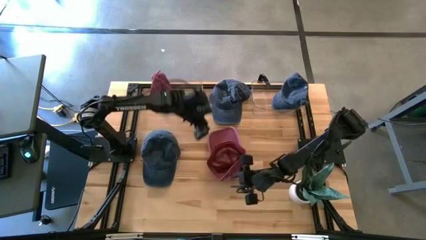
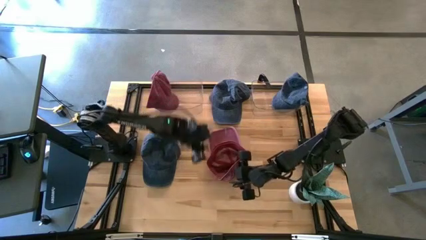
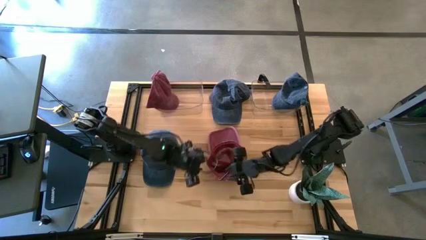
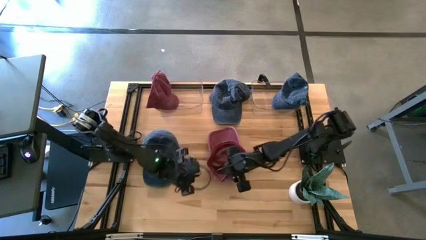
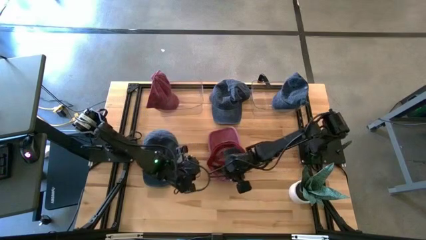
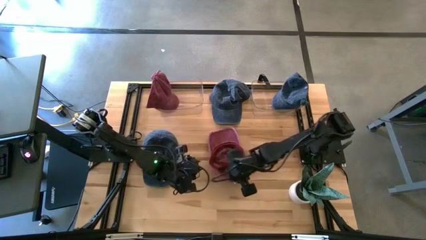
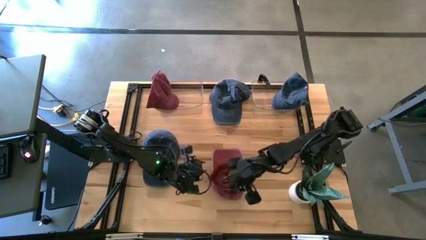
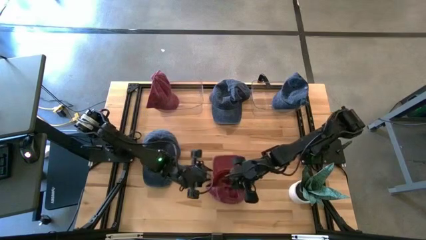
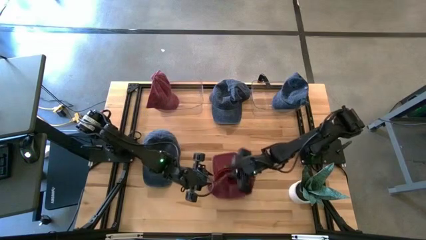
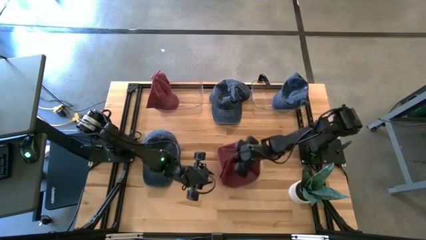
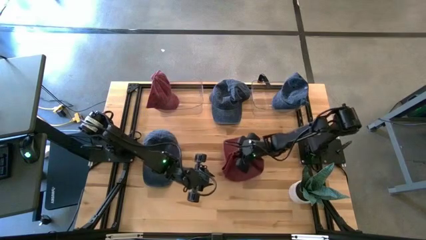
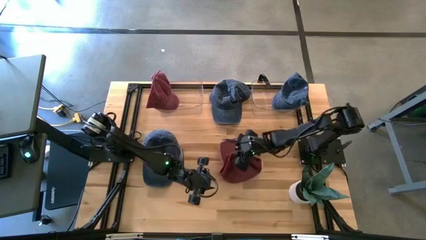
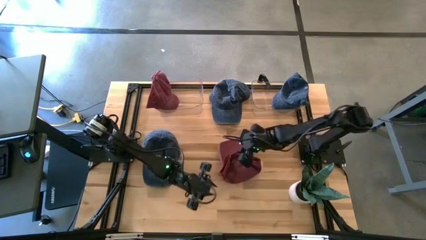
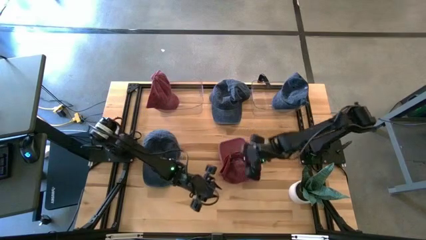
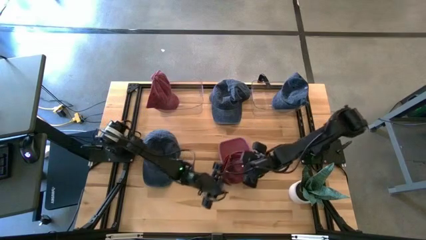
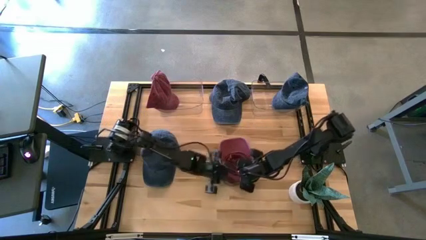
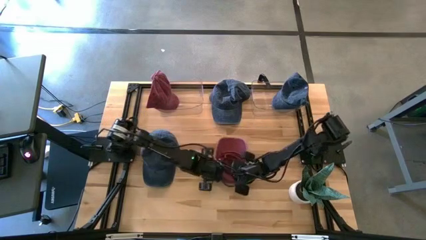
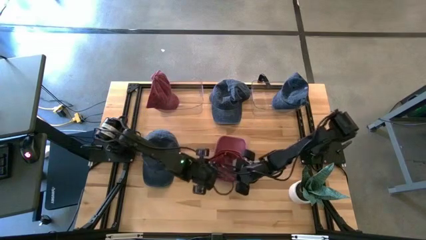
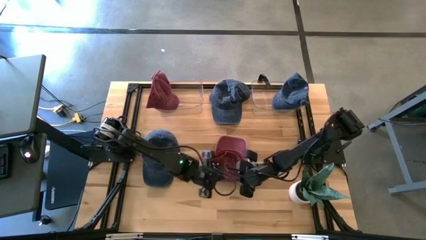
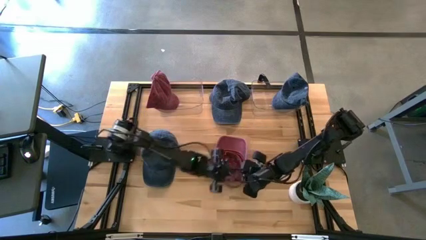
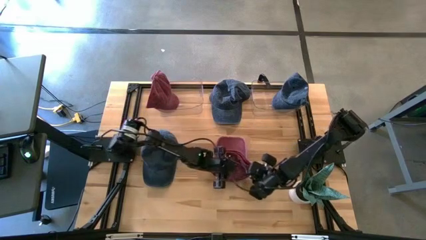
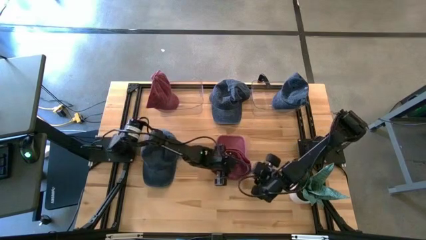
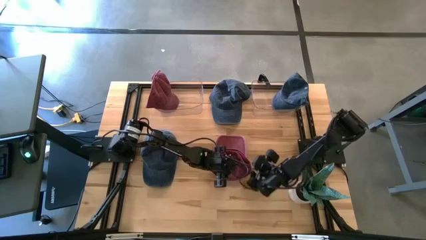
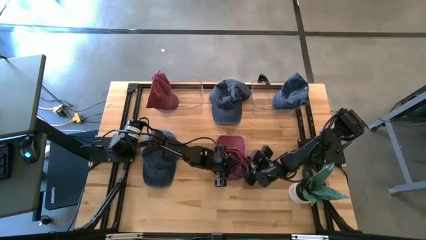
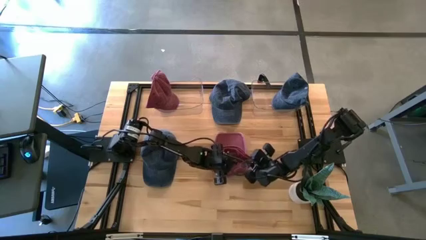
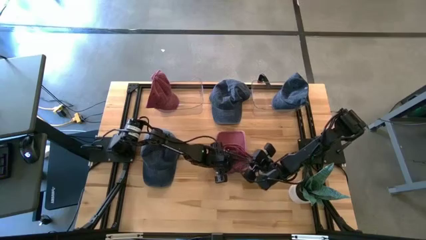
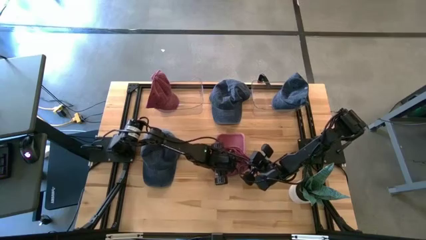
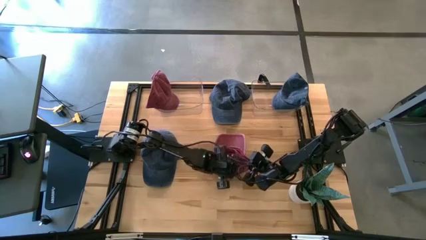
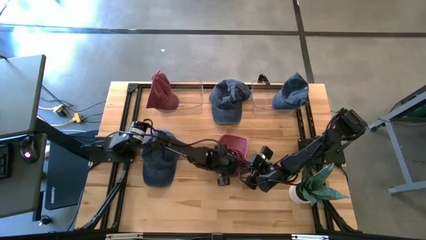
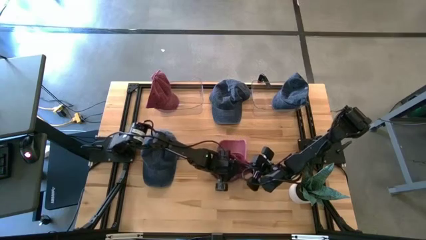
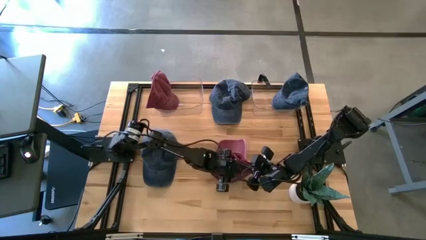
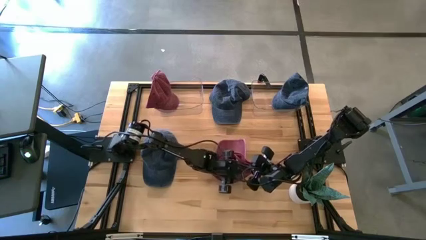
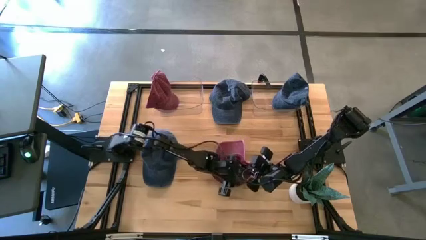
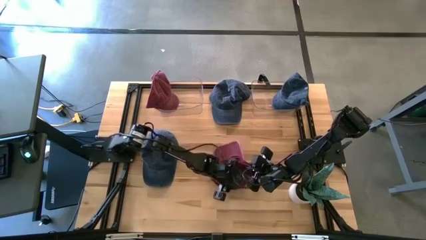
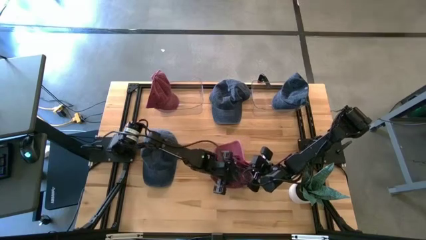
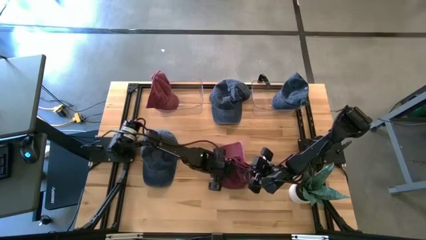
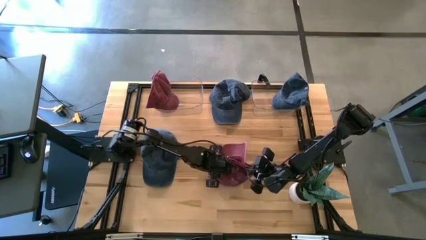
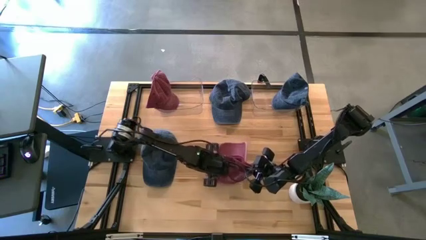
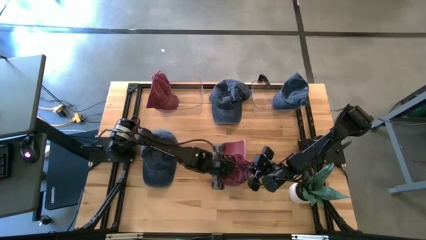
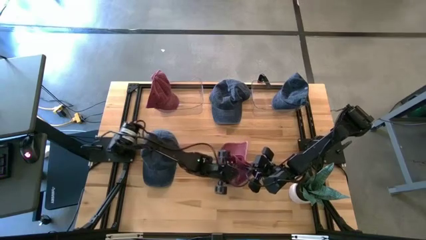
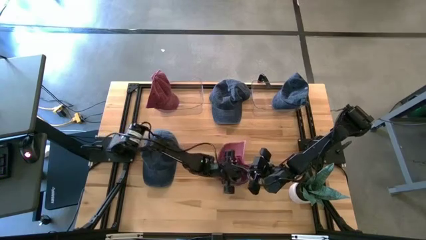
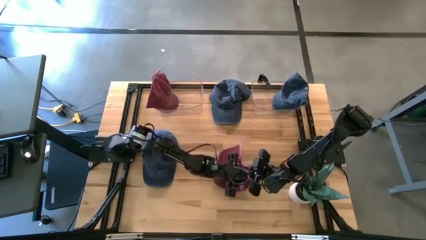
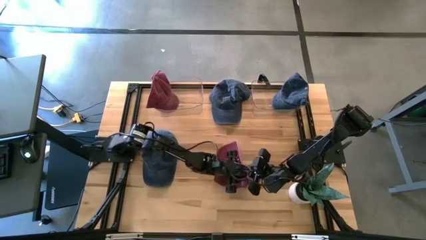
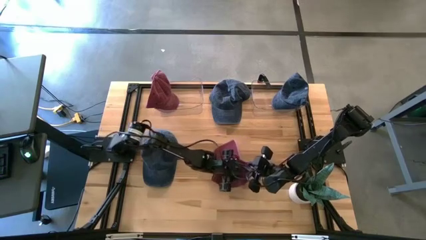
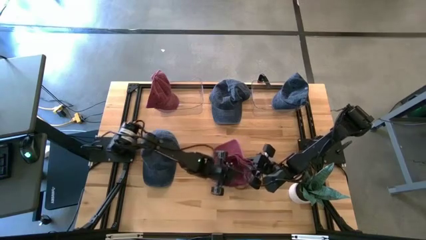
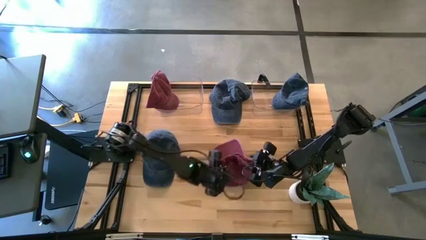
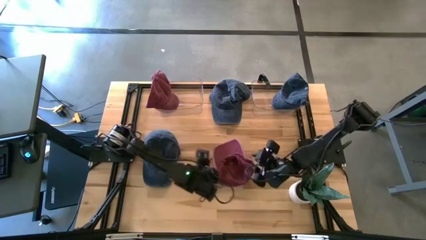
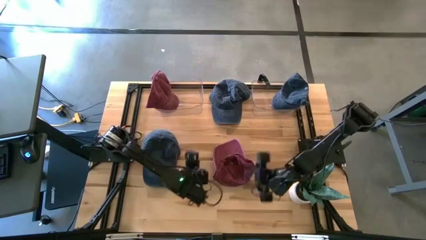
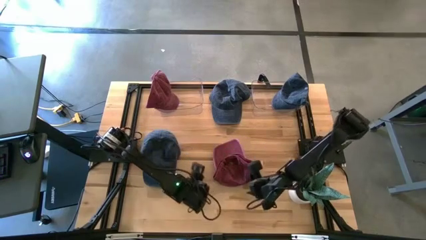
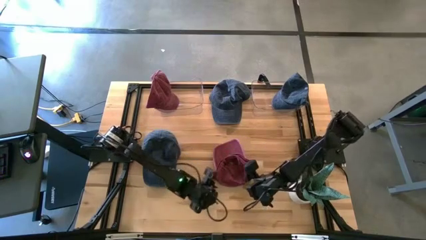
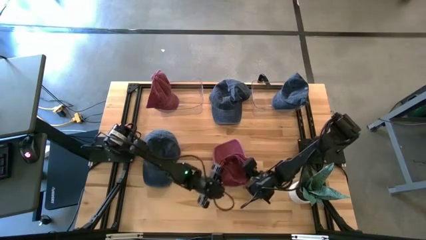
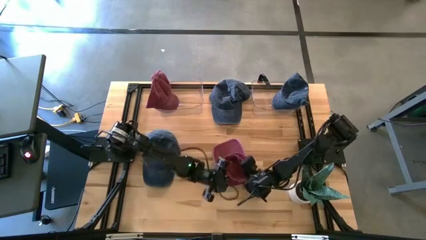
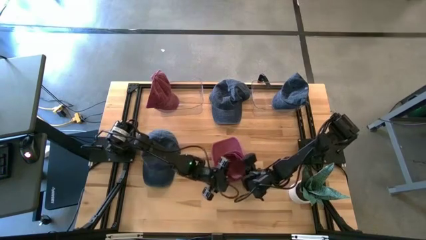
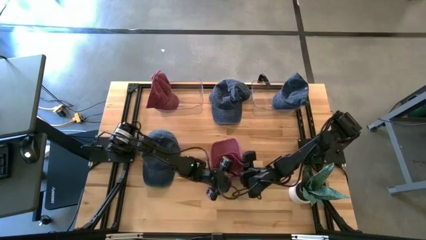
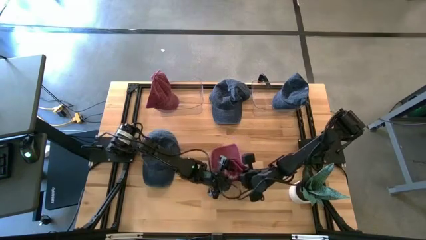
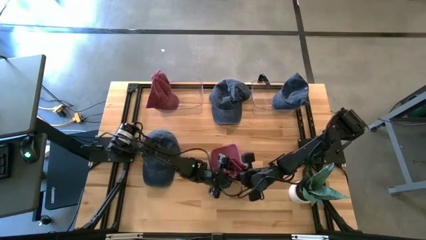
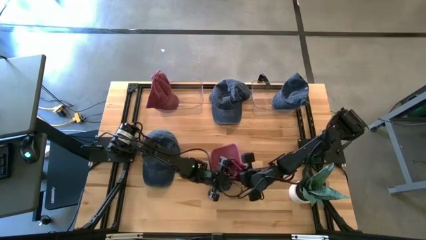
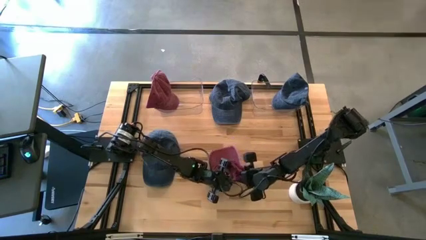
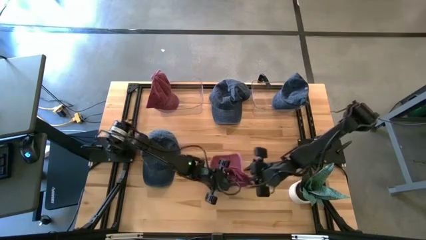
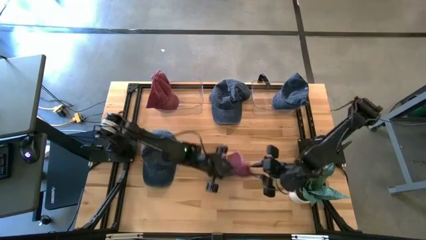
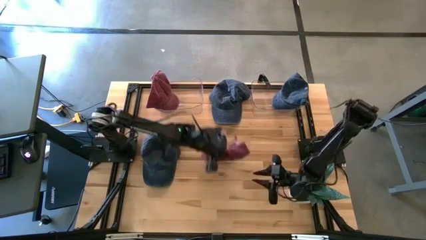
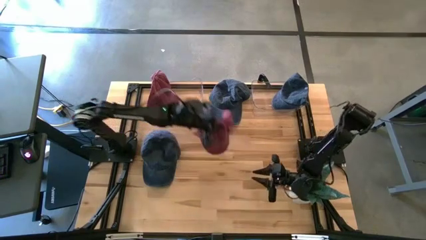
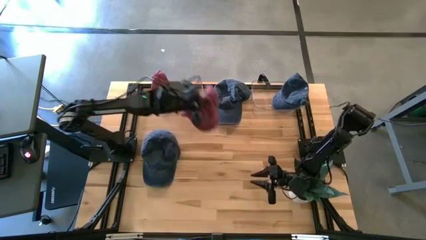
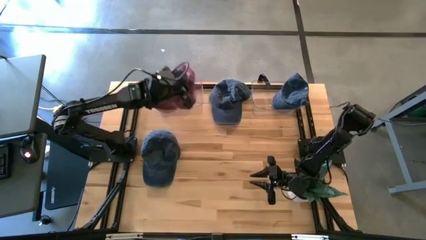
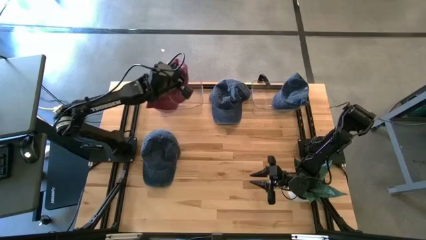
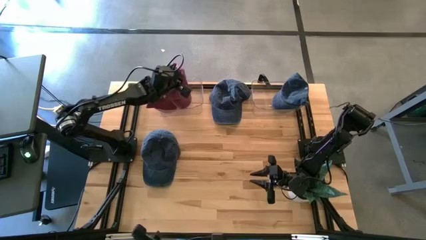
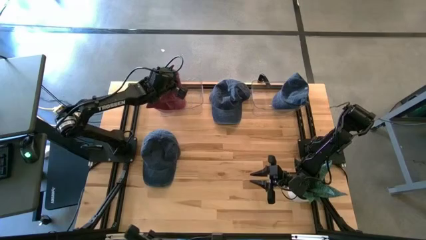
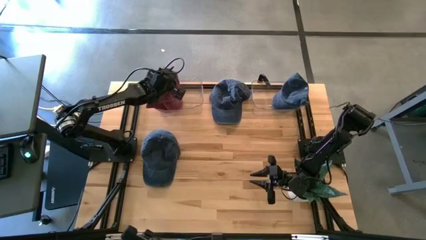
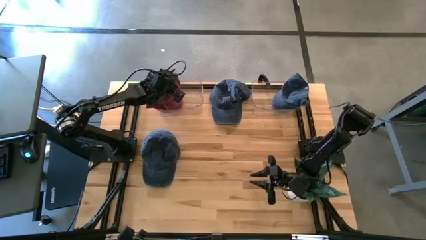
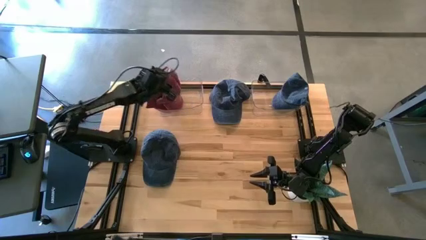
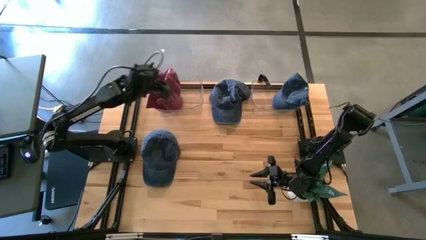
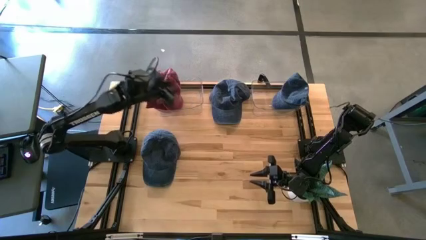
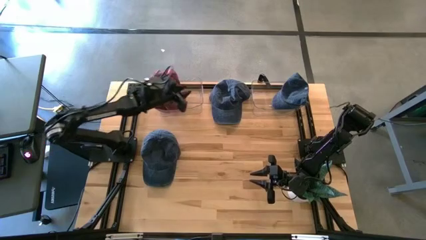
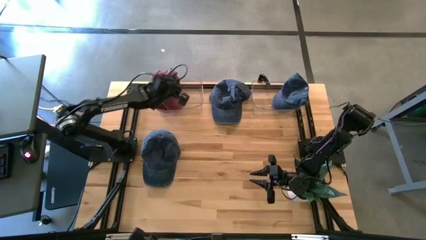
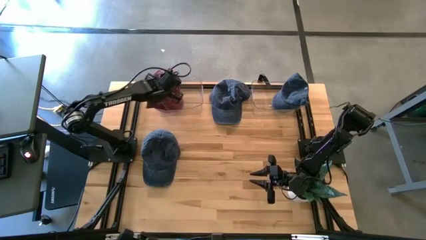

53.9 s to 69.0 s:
Task: Pick & Place hat
Put the red cap into the left transparent bin
